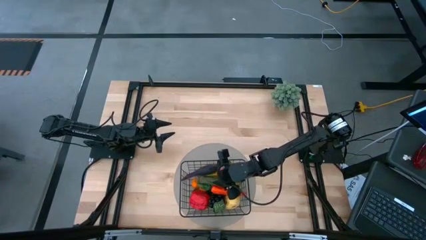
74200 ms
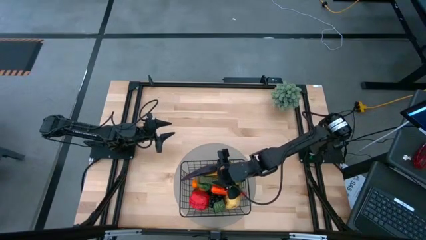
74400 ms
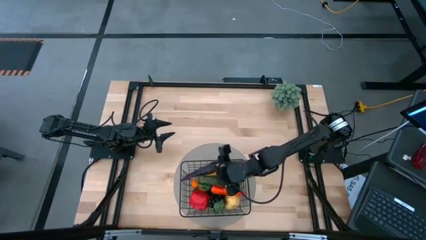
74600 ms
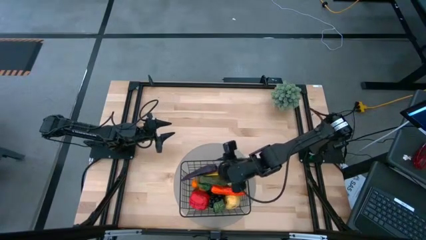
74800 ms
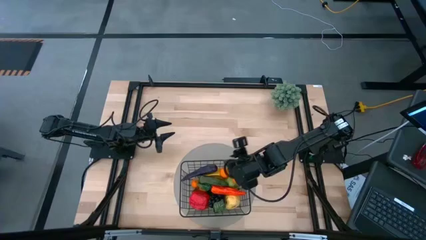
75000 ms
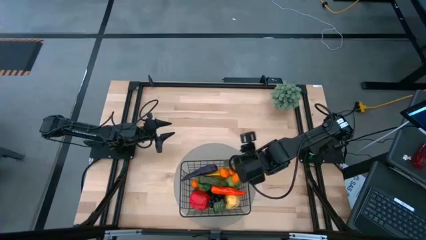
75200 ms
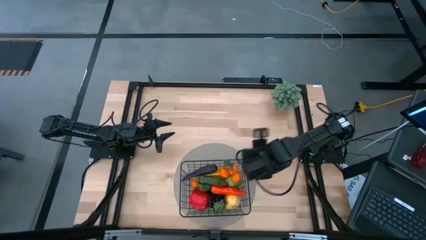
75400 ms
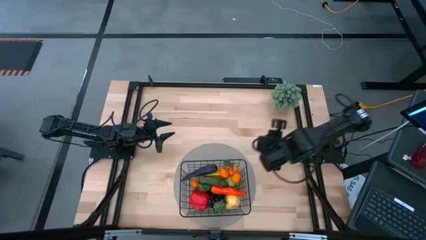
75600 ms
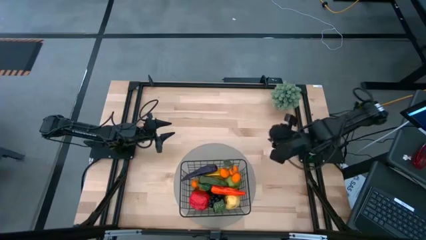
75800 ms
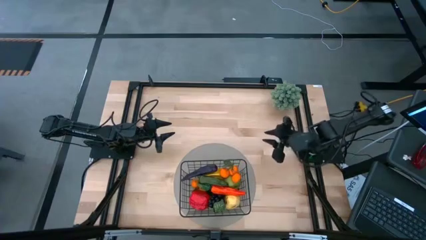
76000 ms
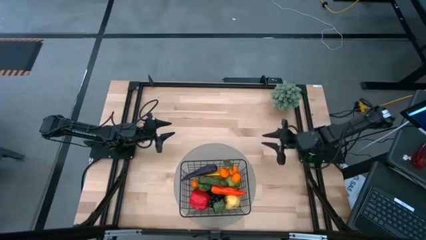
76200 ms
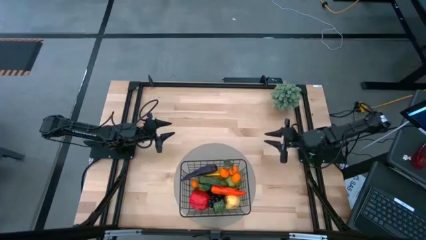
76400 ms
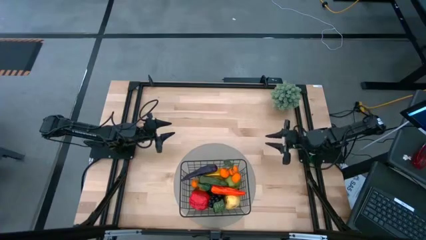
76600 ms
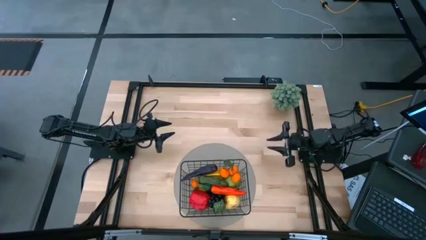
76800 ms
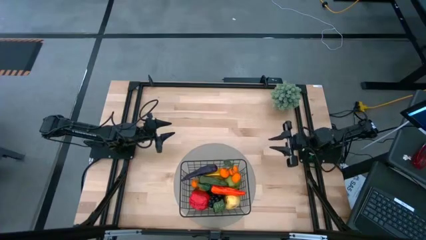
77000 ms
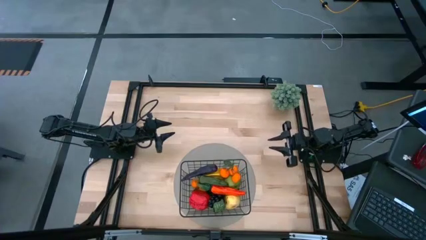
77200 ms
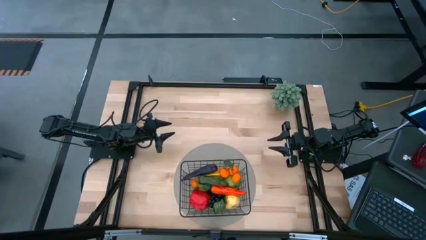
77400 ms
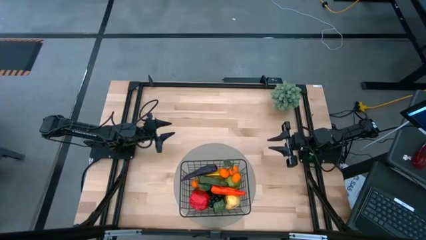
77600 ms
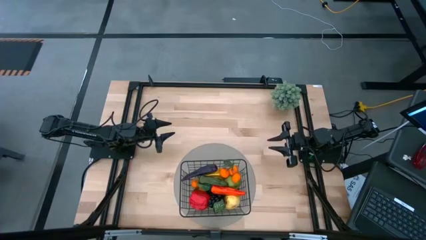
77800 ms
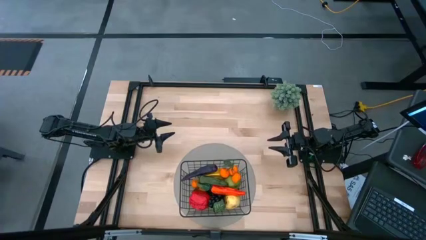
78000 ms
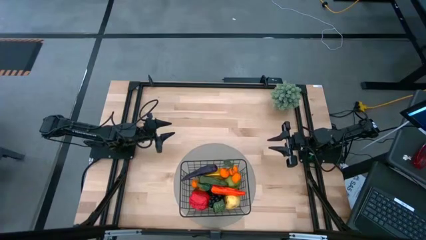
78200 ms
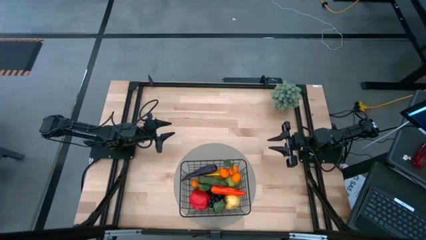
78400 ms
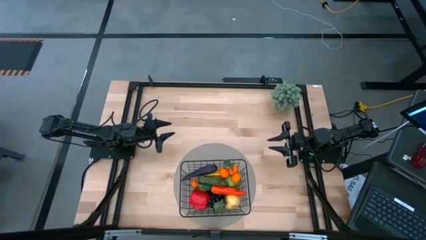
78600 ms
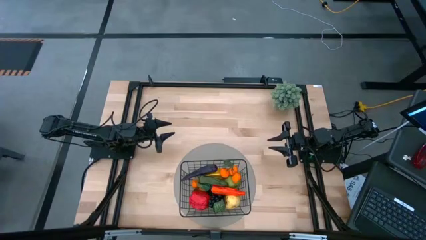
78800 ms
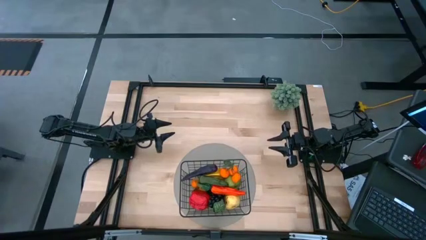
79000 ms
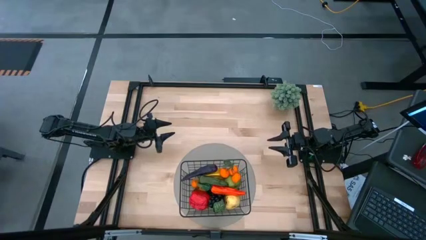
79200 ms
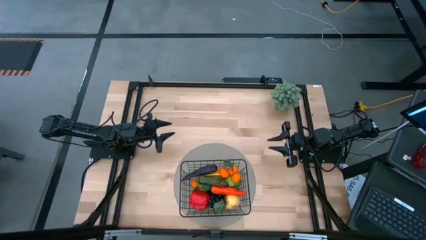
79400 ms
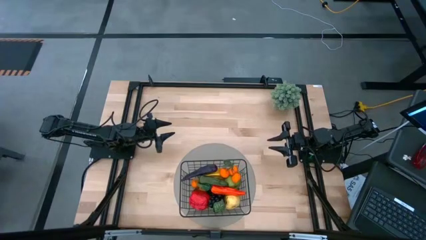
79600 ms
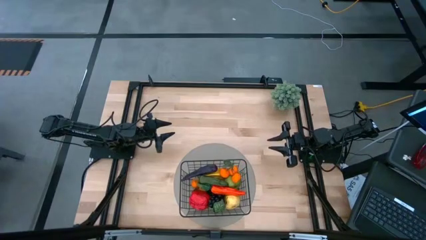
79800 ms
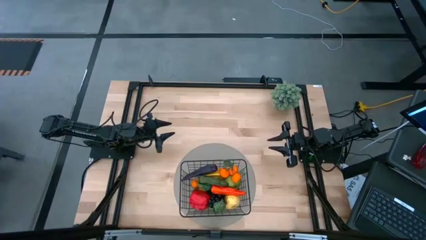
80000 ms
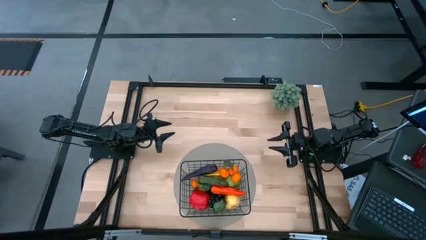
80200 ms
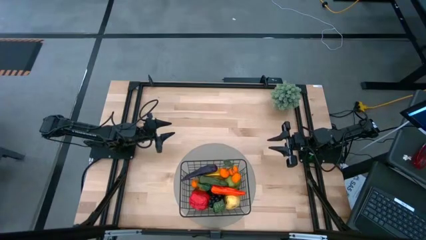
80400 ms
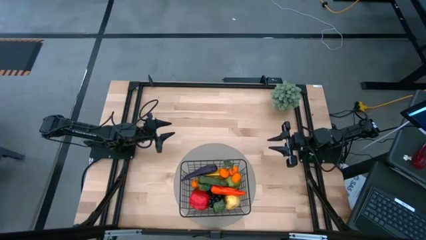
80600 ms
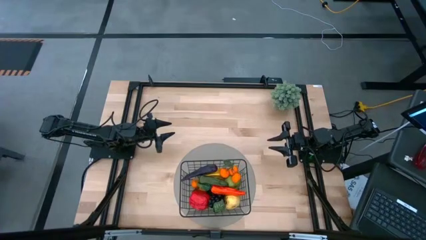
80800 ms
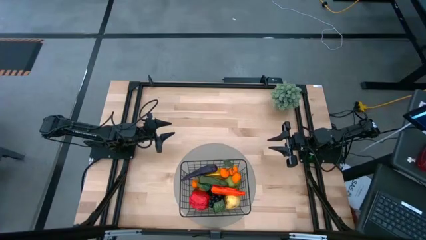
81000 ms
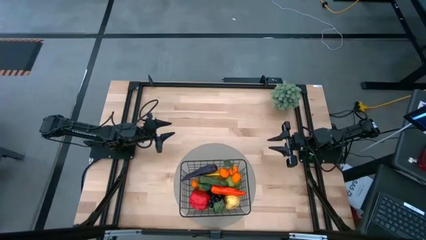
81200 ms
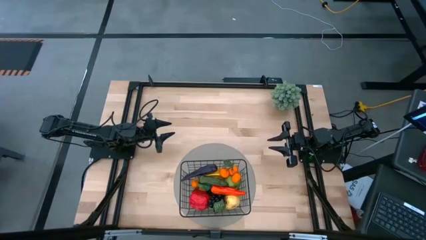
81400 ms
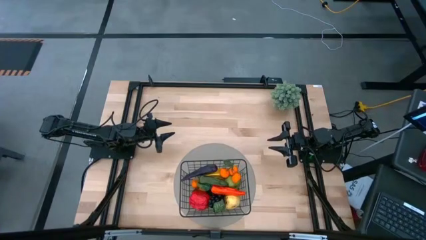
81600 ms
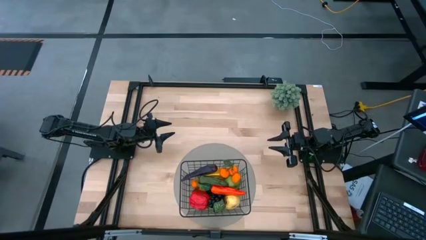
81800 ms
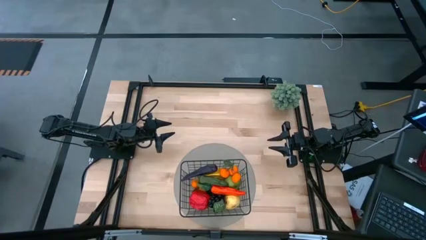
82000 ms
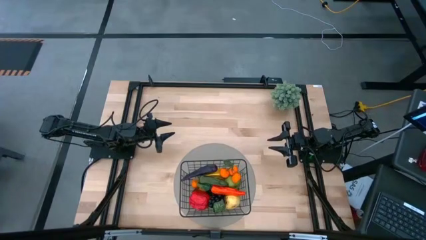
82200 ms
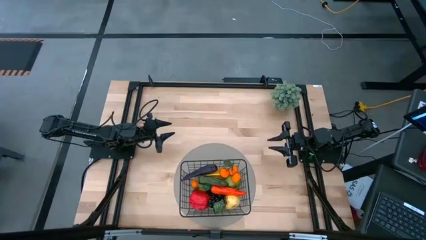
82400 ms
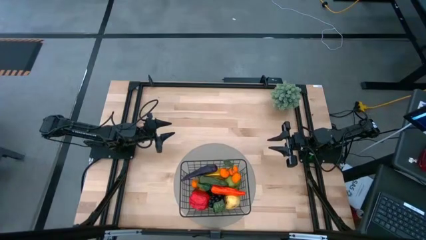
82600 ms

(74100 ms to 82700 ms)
Task: Build produce basket
Return to Home Position

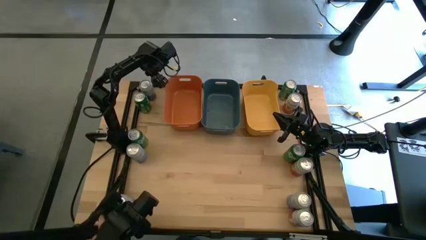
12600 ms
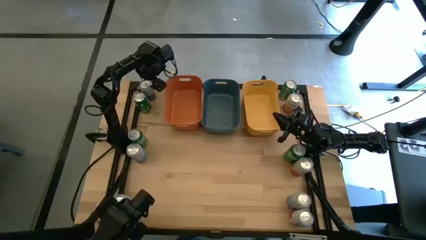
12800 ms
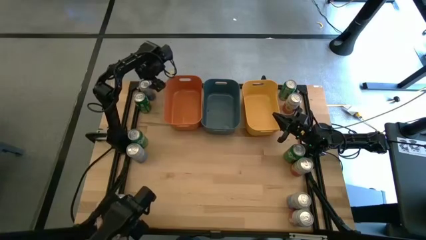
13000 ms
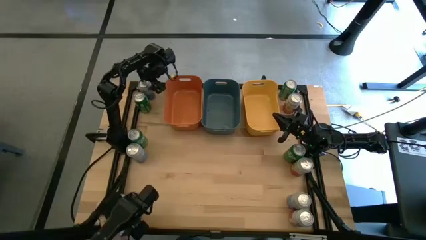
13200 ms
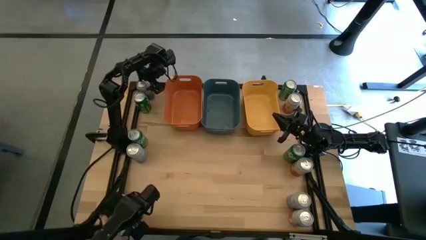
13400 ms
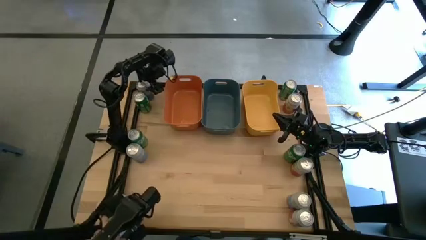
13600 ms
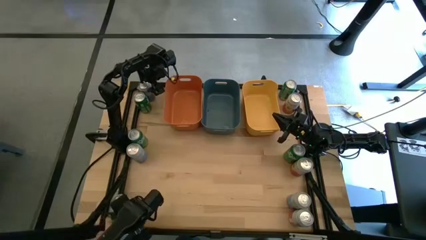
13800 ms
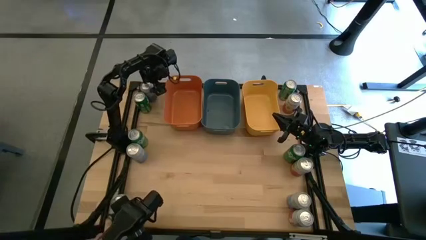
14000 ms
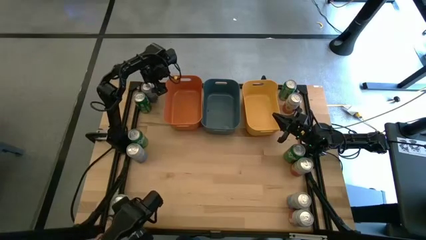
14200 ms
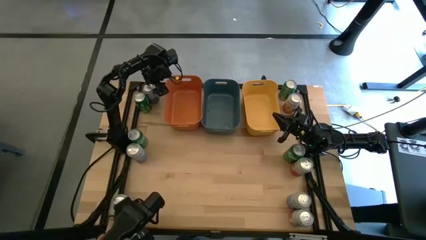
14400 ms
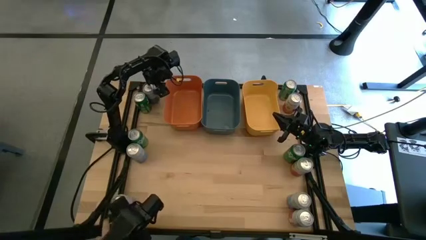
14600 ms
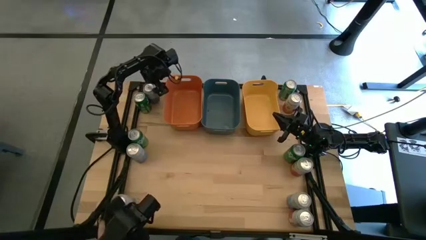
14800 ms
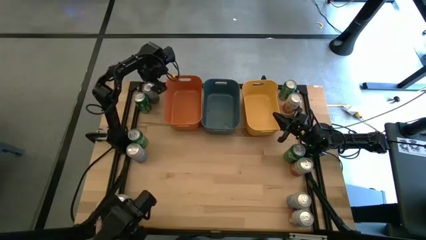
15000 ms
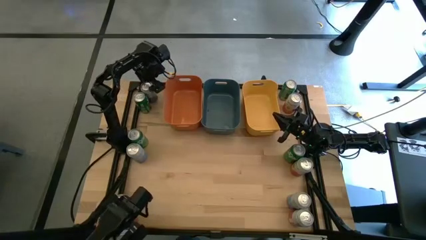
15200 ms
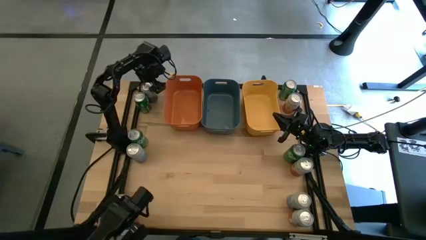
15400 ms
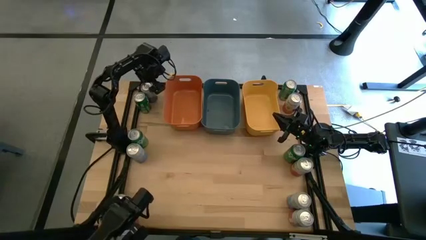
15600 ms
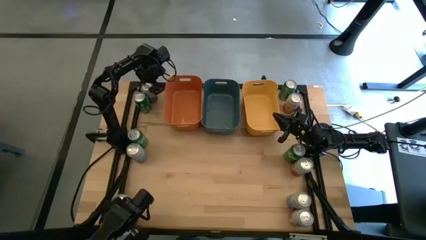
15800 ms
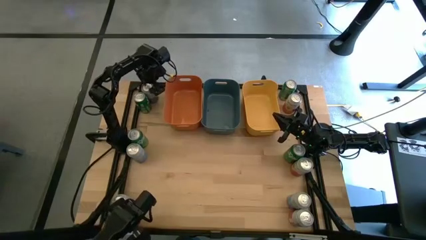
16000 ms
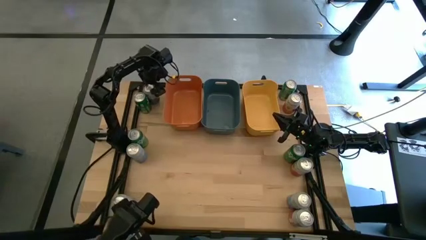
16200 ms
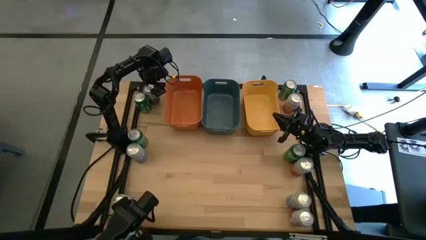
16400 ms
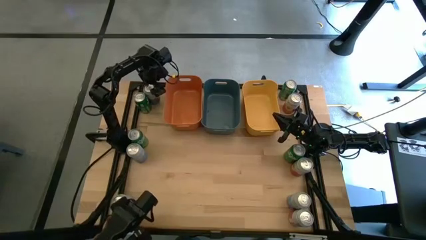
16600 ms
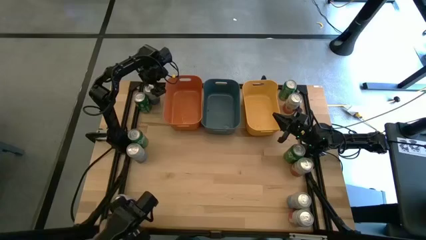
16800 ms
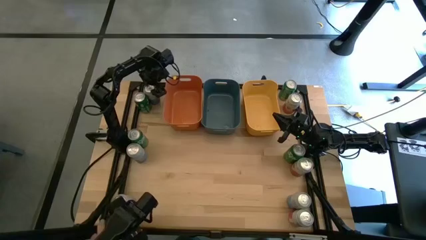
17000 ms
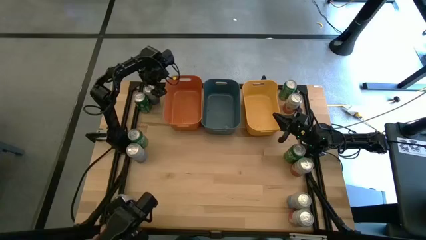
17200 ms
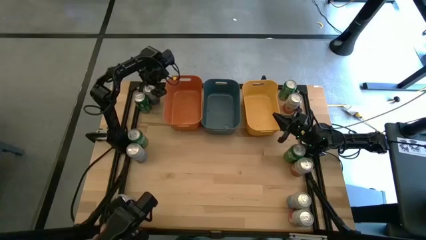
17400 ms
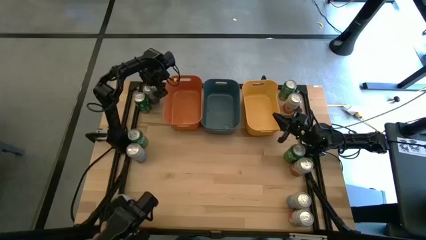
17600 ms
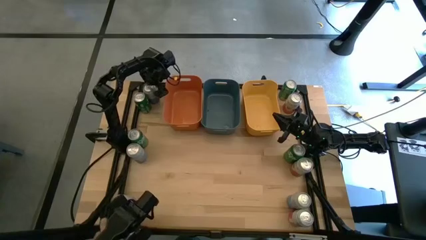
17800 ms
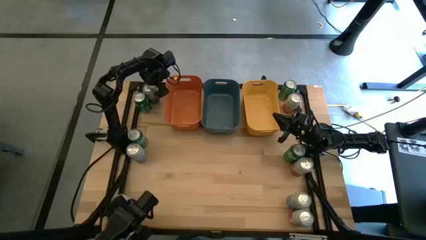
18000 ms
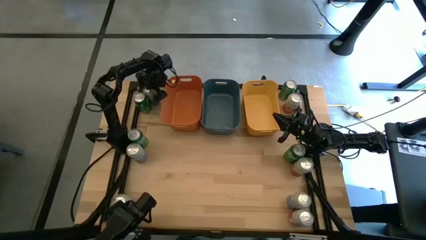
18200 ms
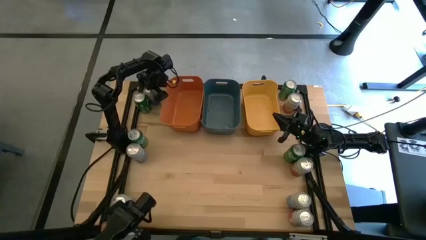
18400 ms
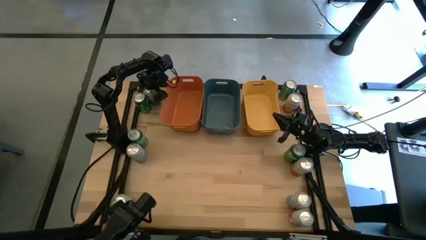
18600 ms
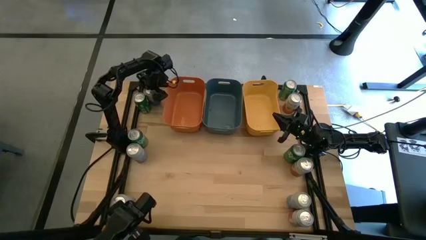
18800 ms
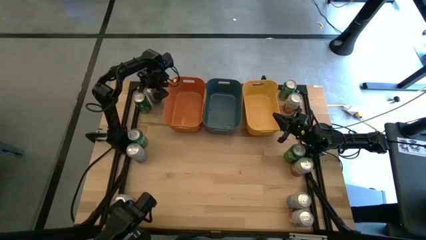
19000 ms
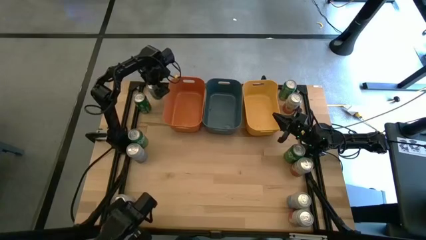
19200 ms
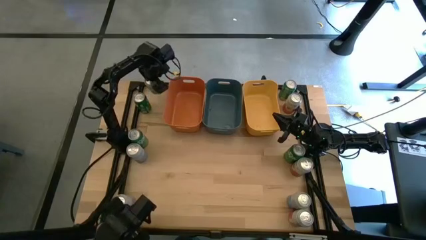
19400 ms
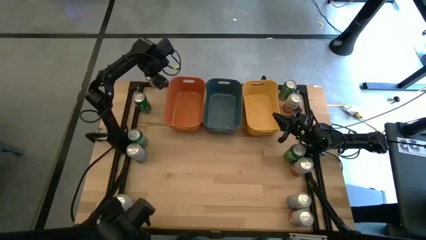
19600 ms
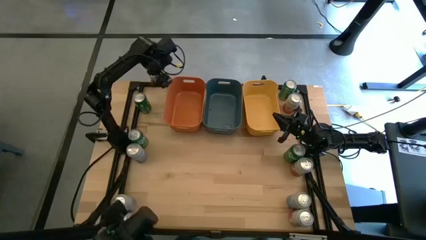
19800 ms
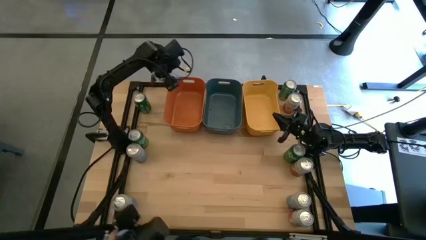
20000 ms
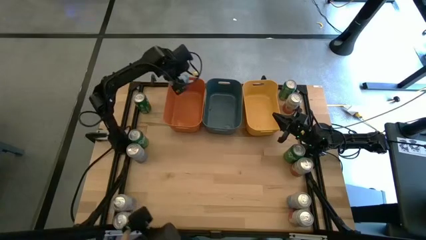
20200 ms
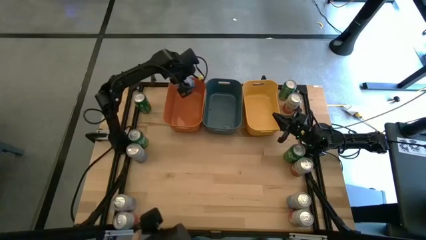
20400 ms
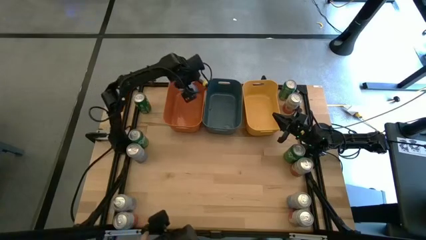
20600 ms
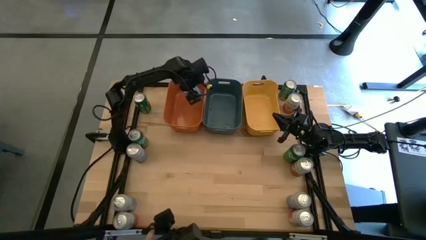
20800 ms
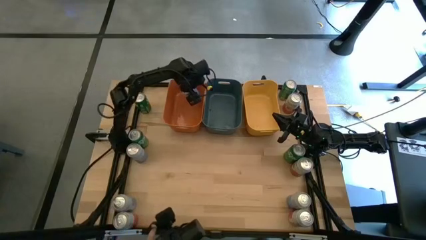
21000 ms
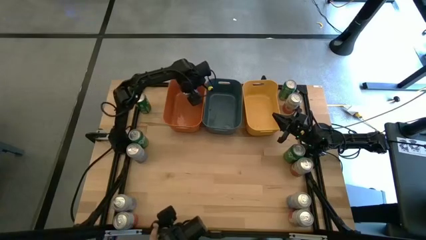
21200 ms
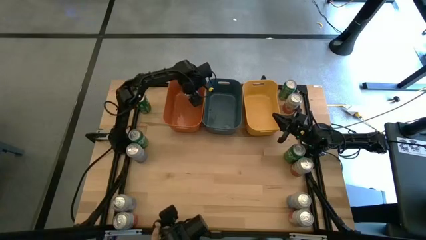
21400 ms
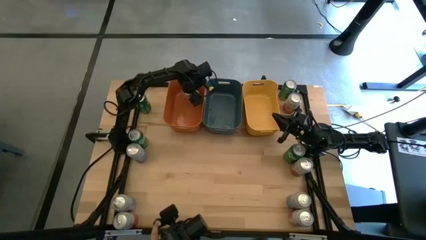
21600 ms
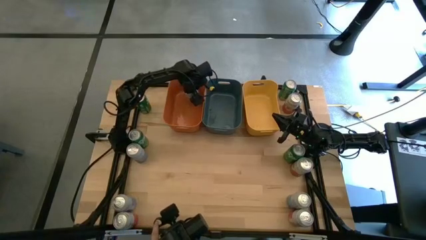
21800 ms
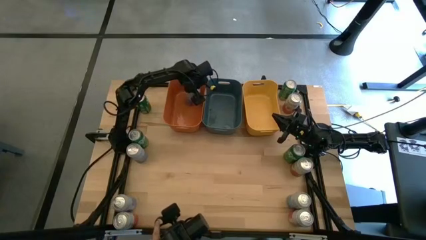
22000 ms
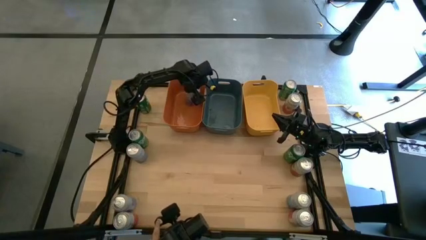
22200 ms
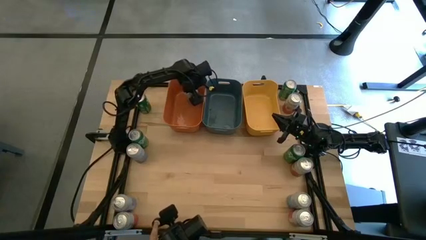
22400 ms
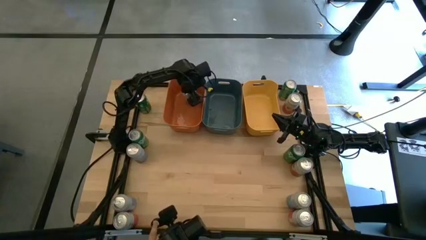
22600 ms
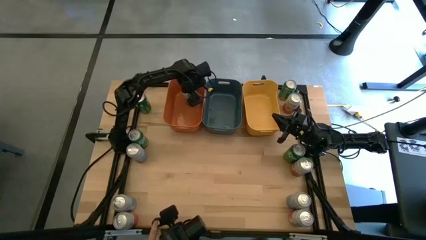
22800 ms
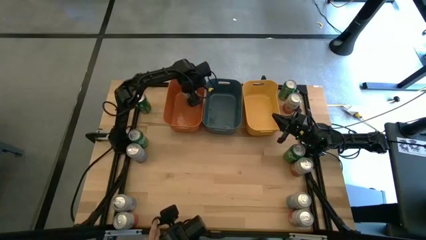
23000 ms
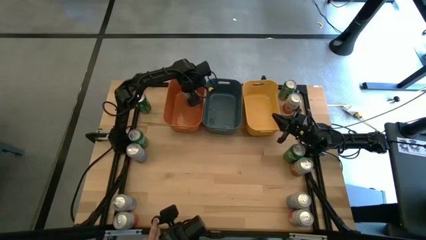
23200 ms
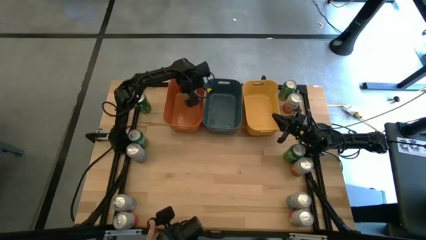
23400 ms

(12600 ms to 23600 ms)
Task: Sort soda cans
Put the top left blue-white soda can into the orange bin
